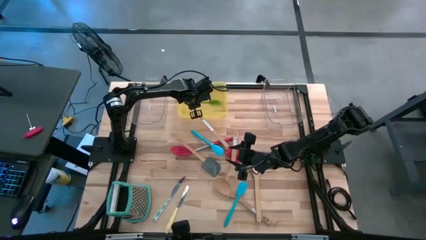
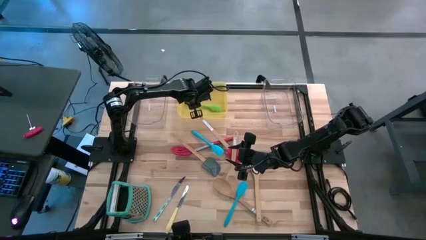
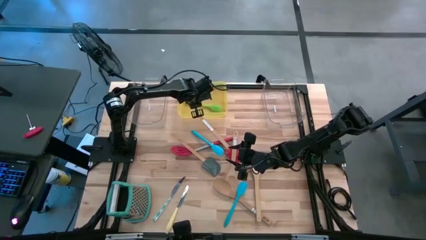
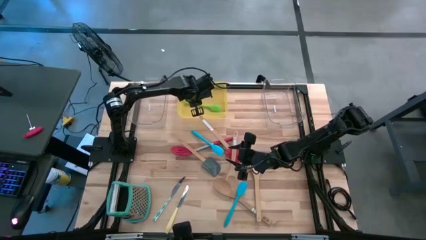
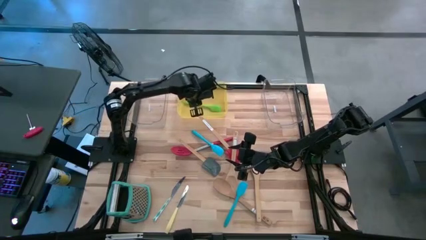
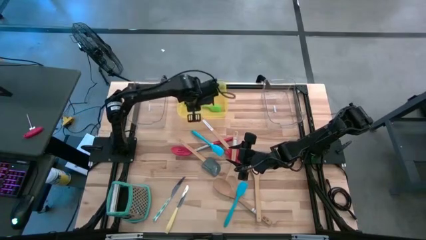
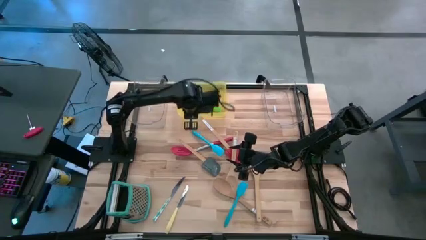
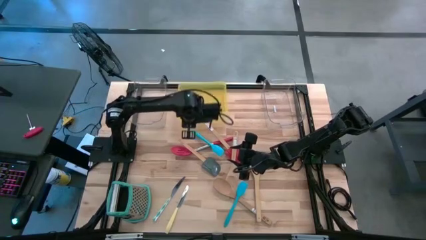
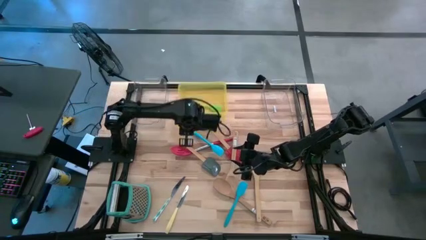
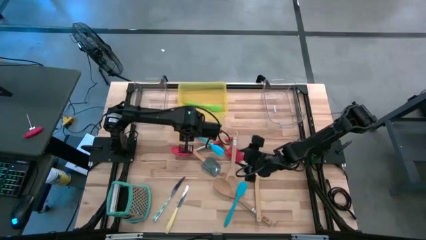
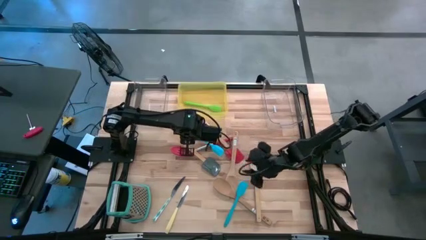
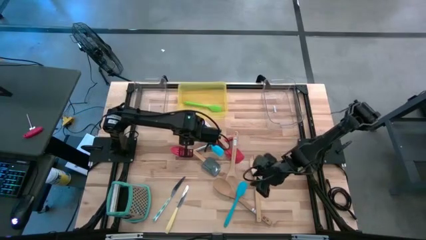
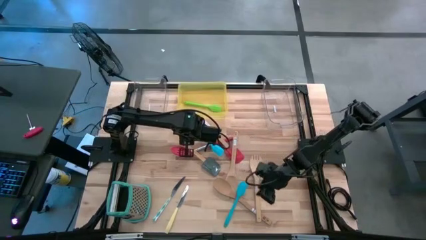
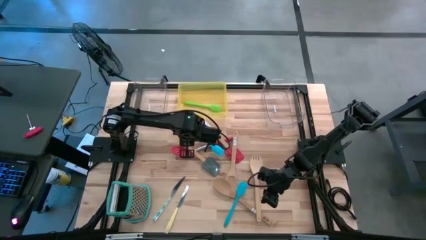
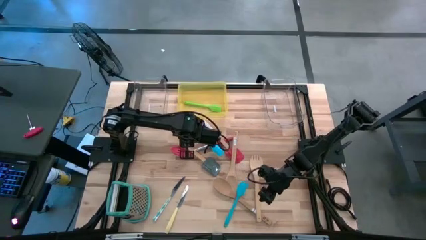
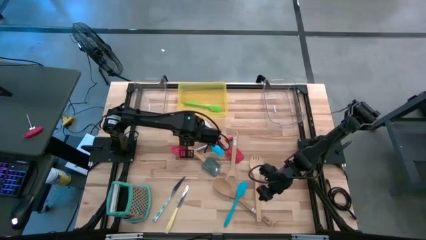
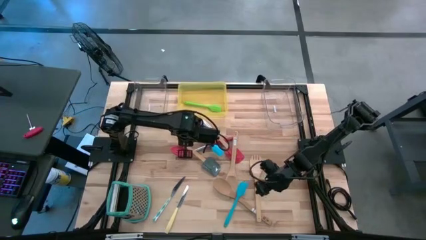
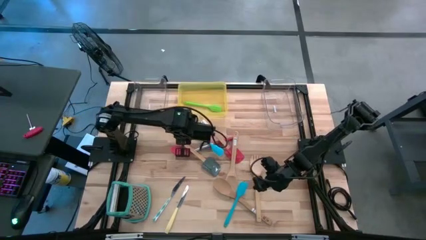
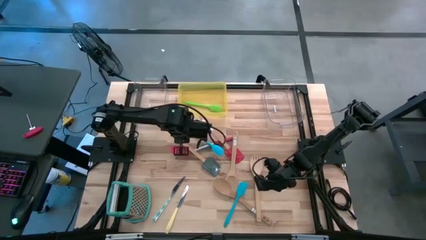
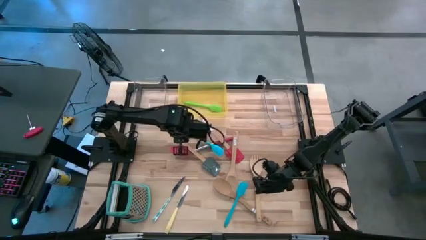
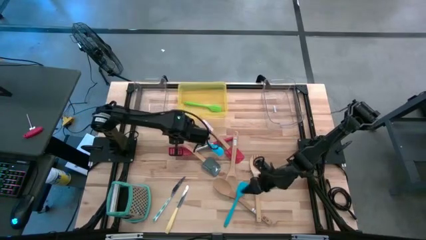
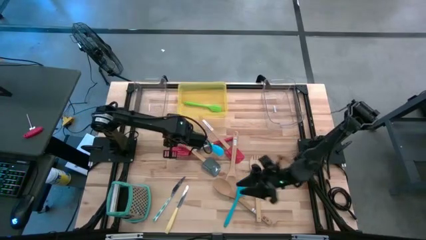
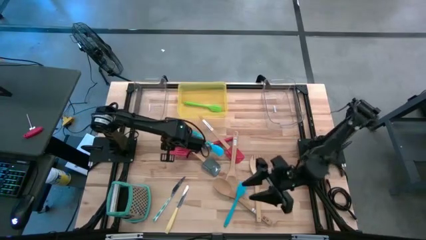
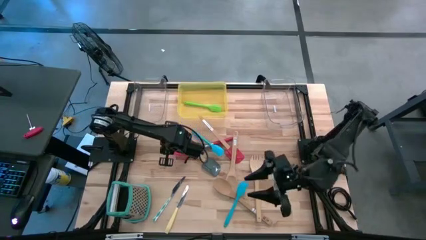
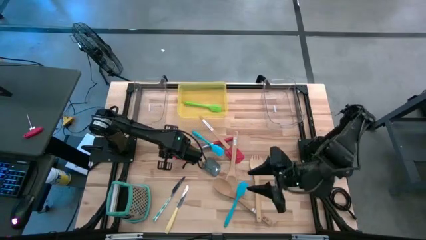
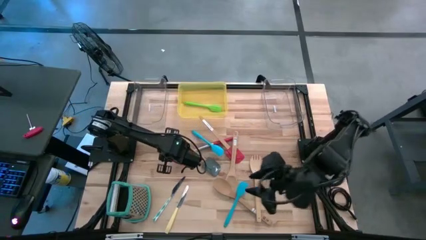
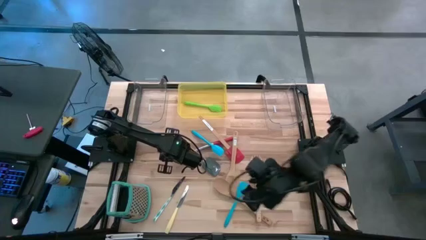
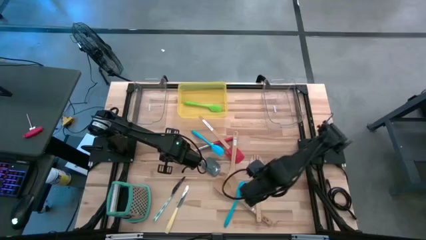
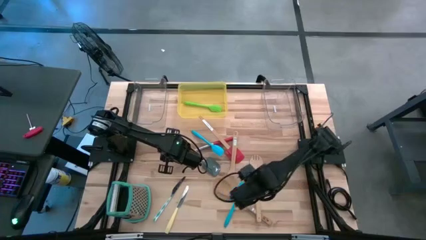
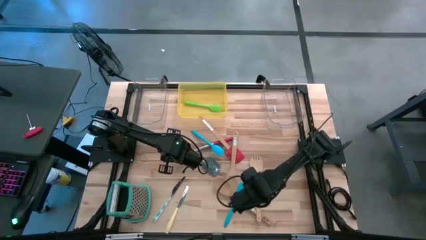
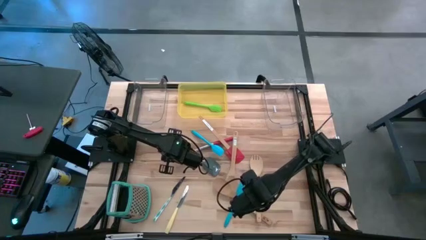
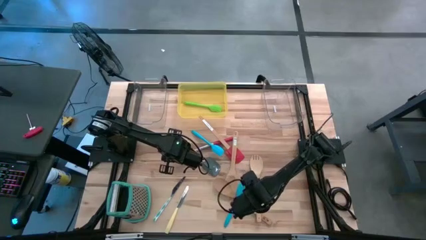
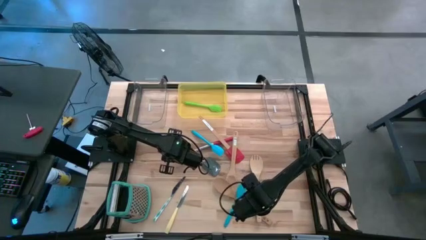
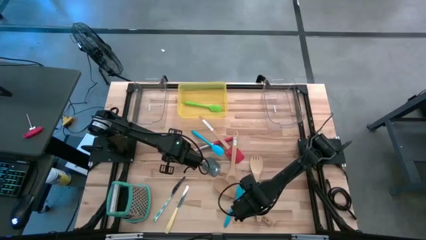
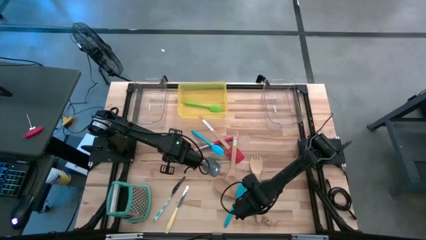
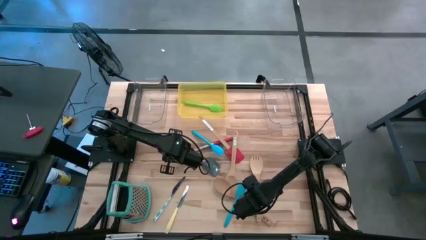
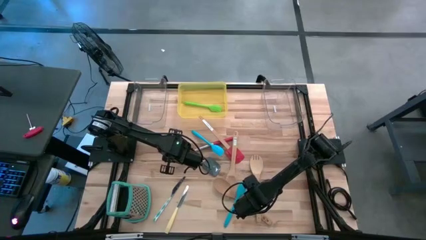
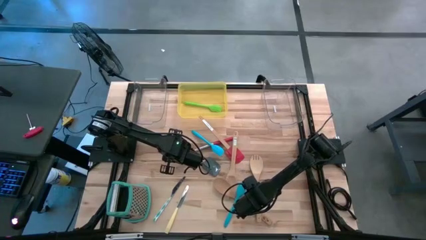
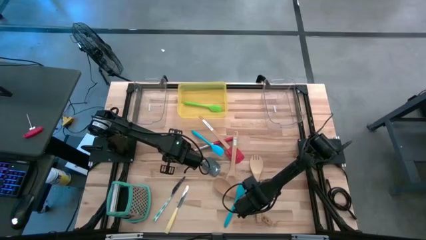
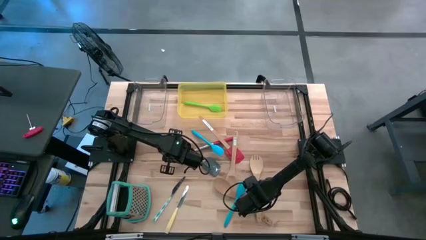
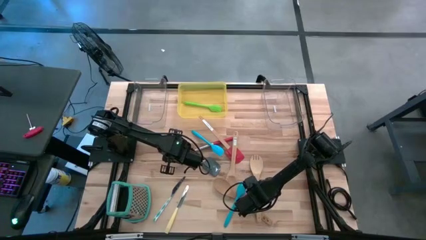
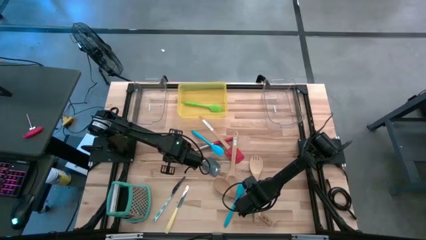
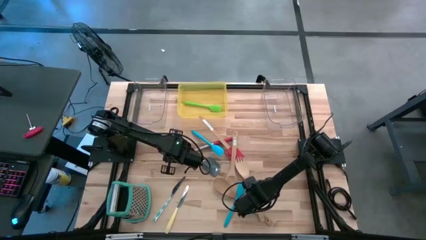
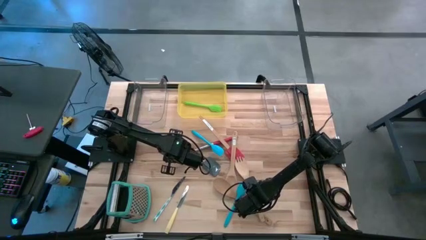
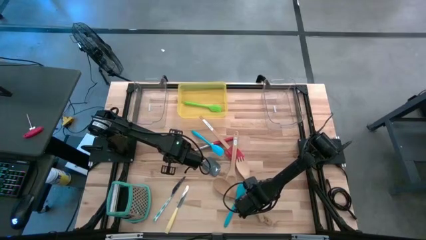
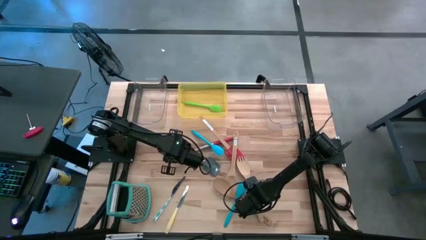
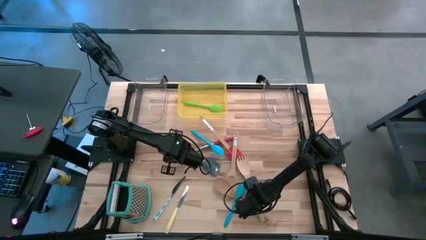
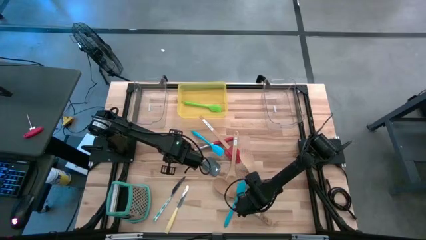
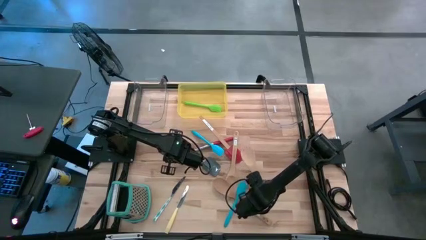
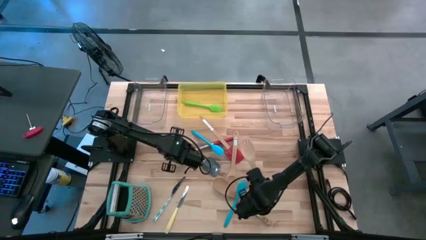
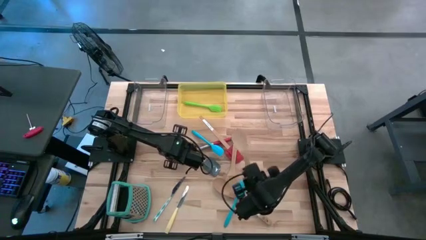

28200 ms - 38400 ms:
Task: Pick & Place Kitchen Items
Put the right wooden spork ladle into the left transparent bin

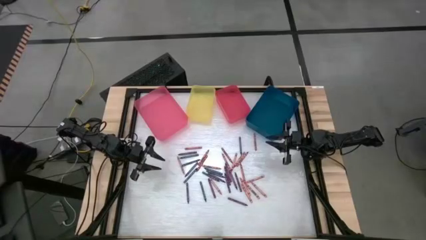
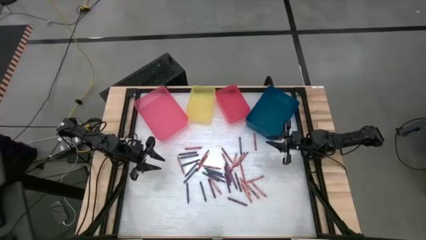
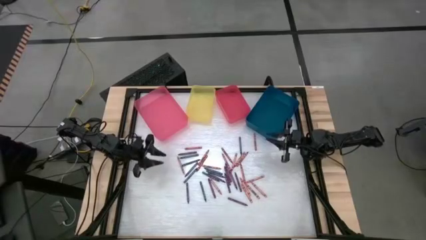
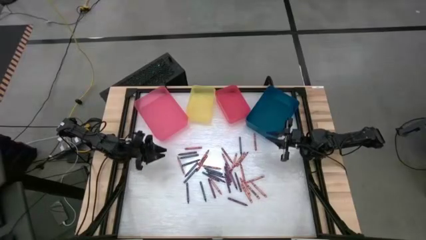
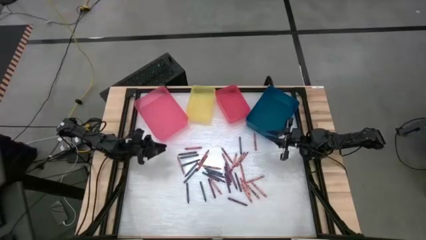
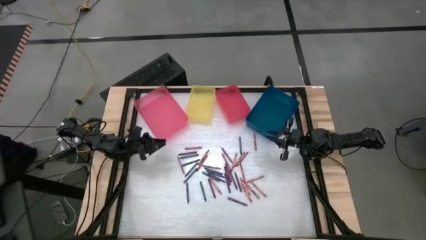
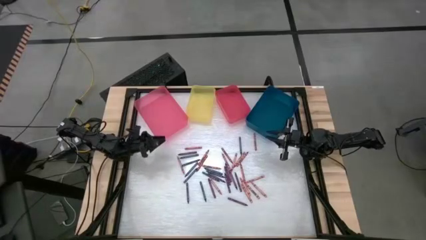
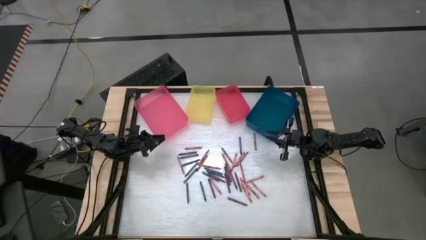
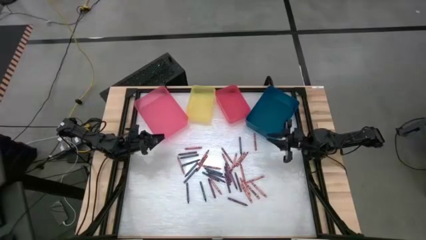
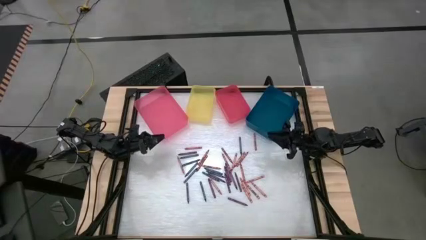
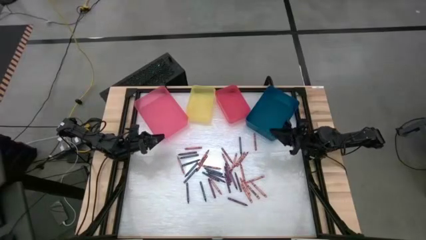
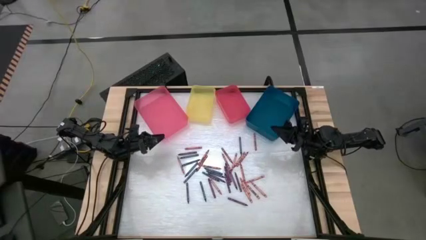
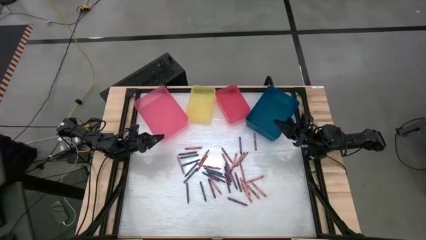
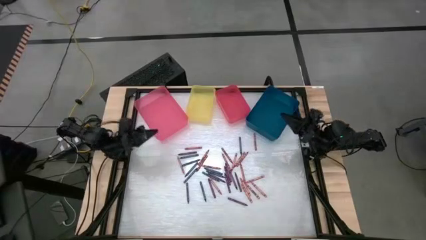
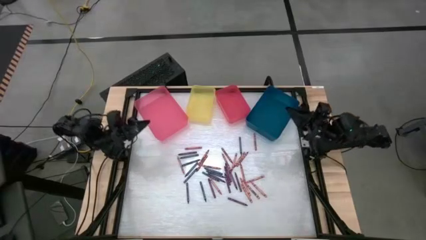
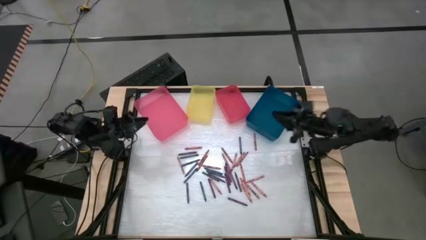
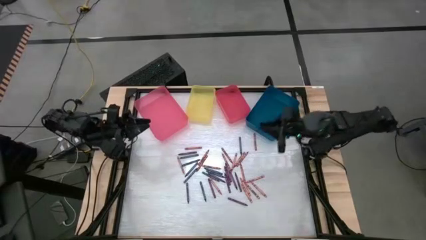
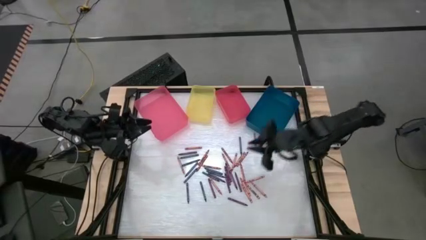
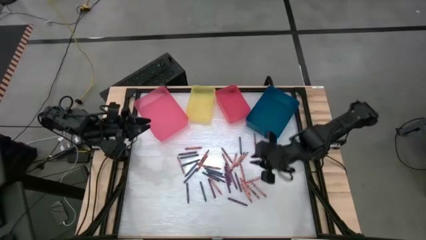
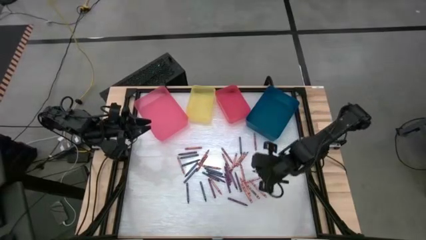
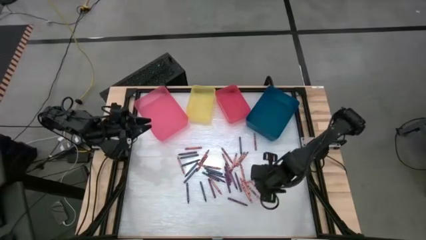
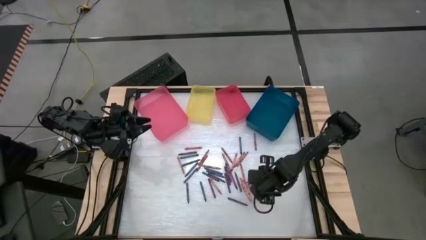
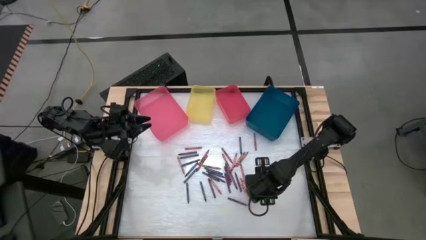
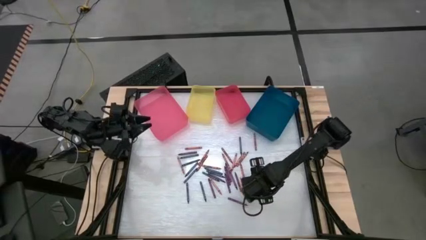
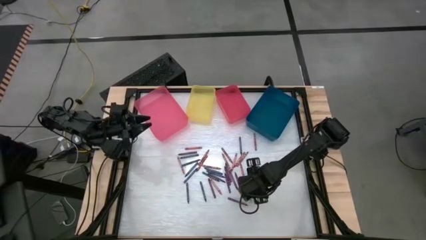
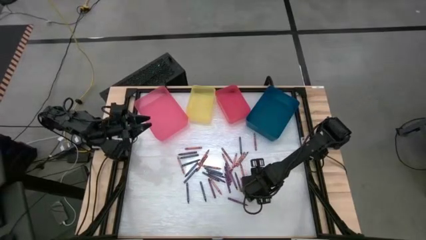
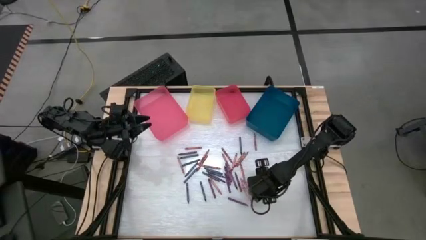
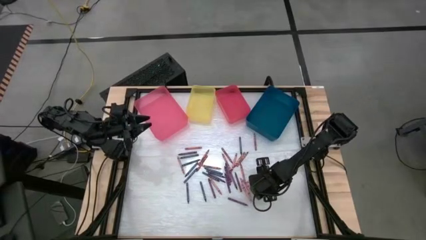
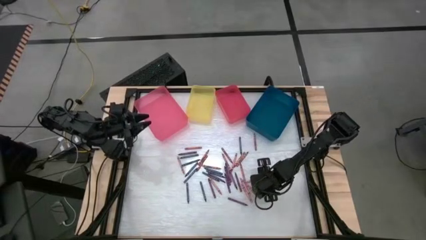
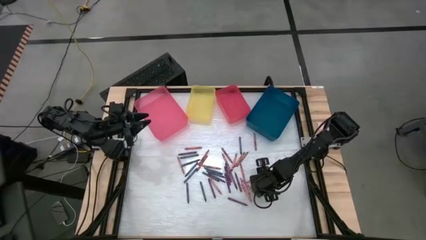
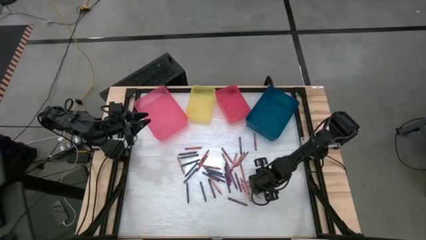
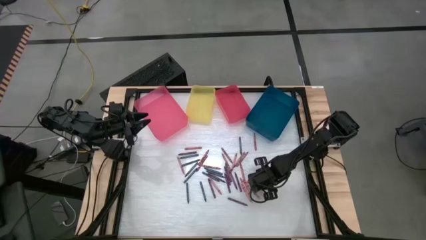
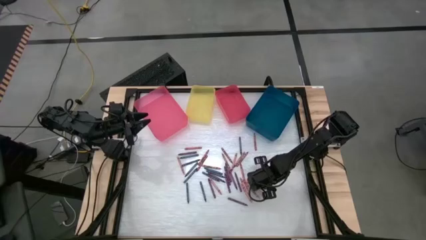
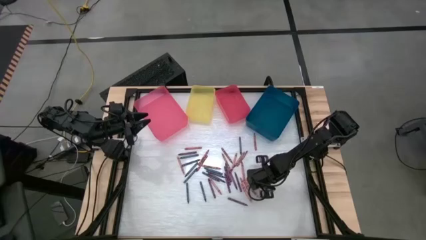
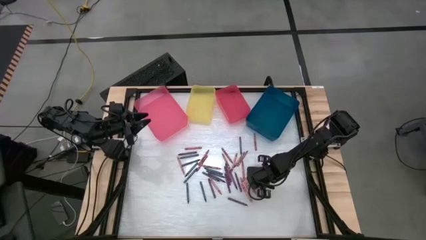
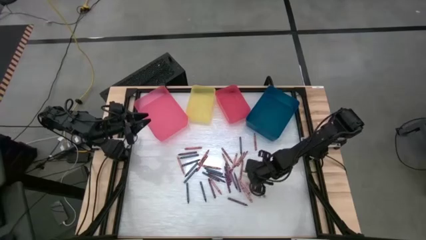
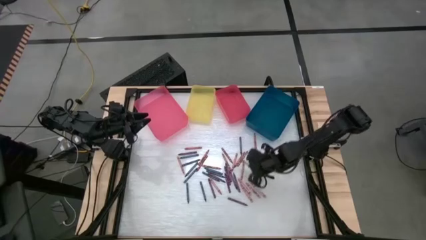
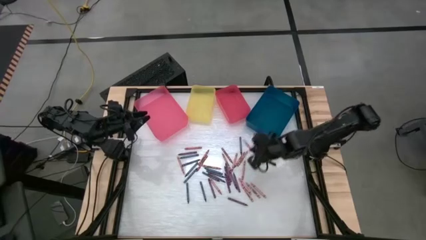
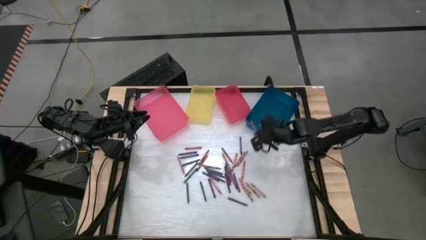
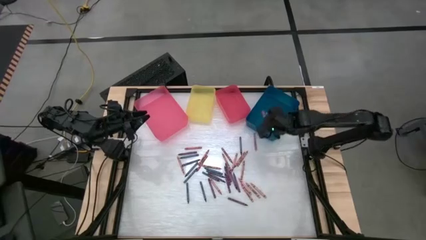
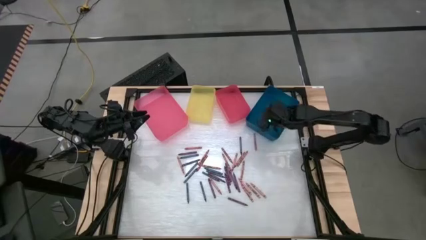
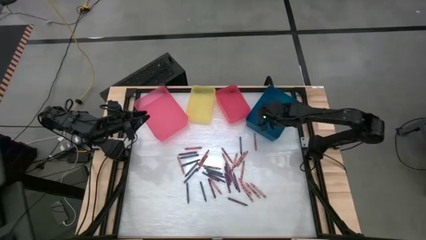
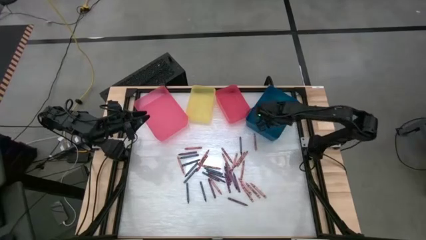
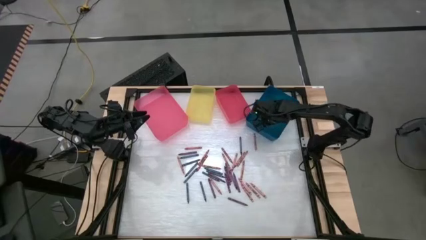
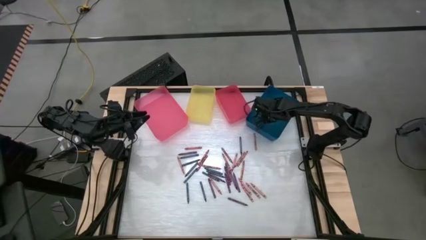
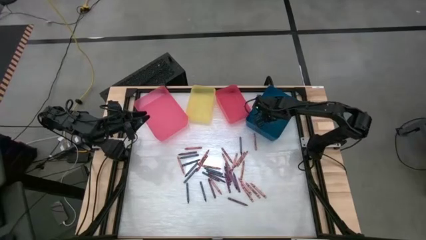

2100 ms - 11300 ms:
Task: Sort crayons
Put the pink crayon into the blue bin
